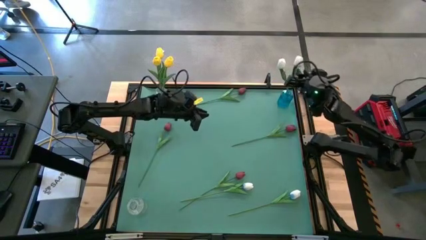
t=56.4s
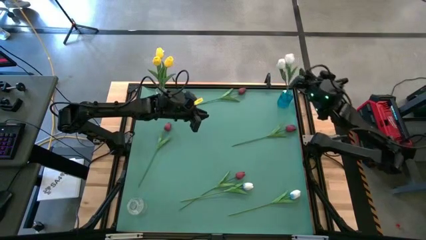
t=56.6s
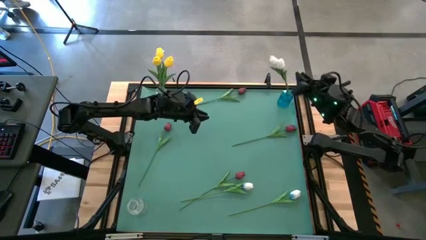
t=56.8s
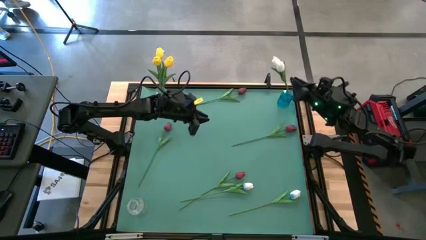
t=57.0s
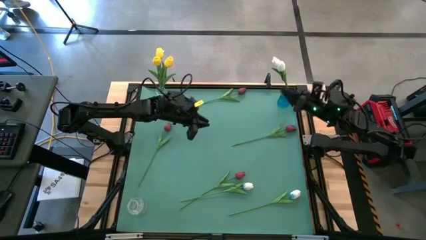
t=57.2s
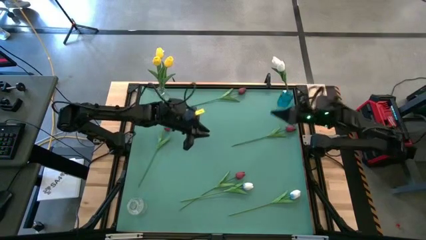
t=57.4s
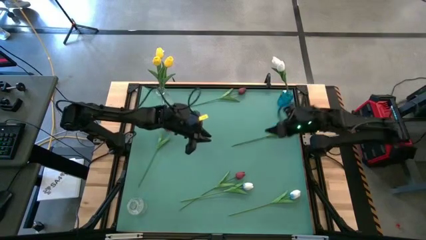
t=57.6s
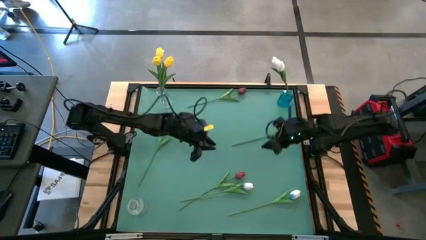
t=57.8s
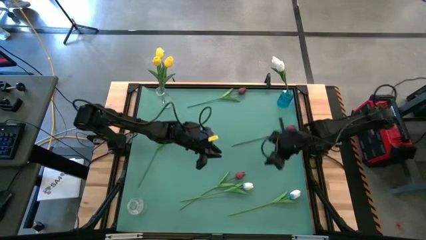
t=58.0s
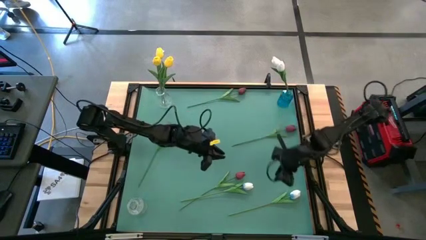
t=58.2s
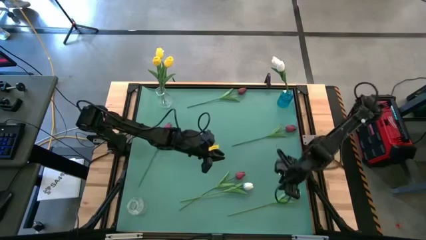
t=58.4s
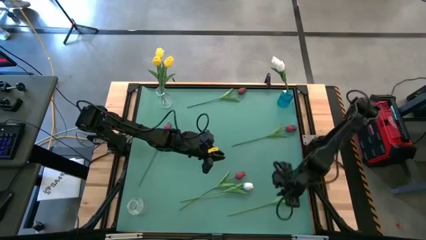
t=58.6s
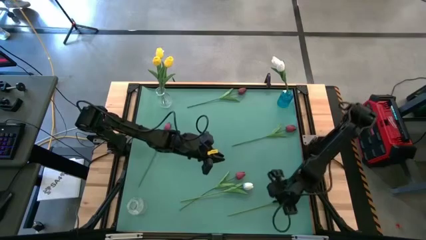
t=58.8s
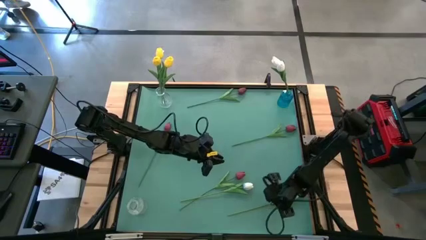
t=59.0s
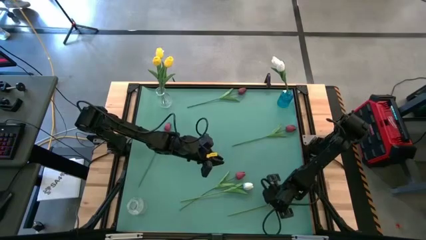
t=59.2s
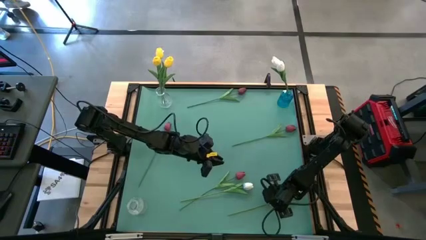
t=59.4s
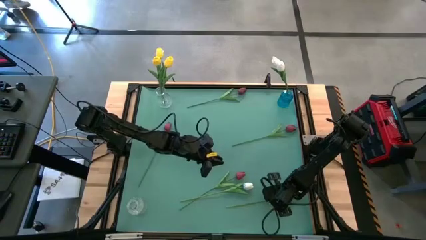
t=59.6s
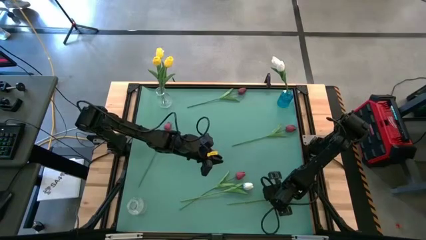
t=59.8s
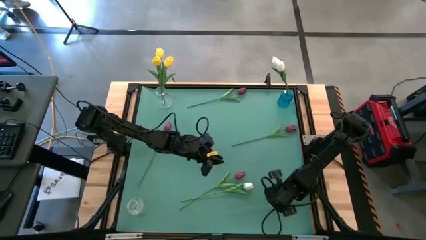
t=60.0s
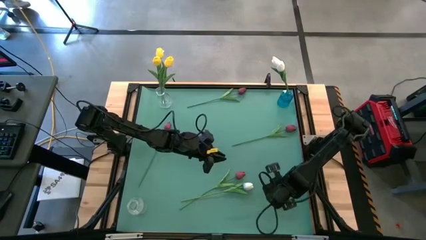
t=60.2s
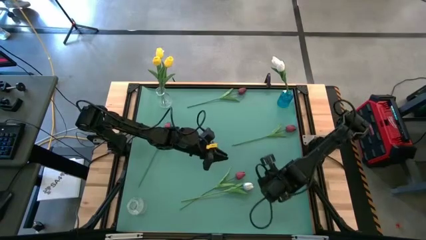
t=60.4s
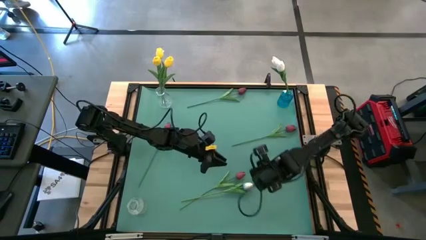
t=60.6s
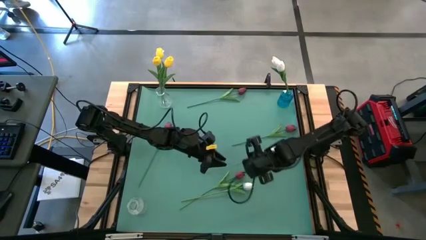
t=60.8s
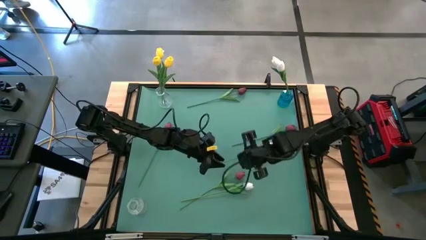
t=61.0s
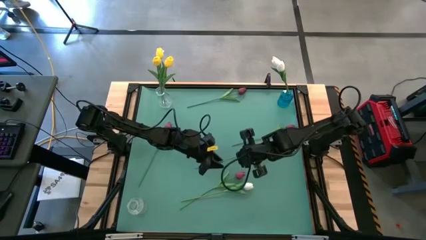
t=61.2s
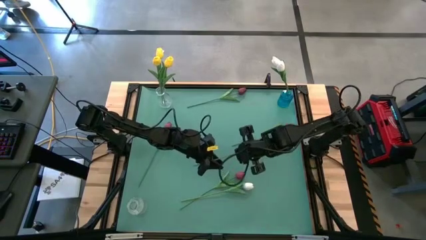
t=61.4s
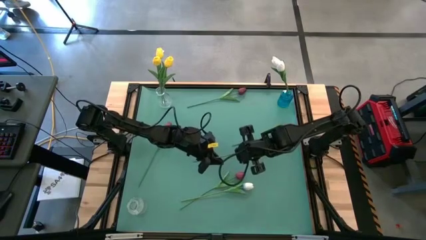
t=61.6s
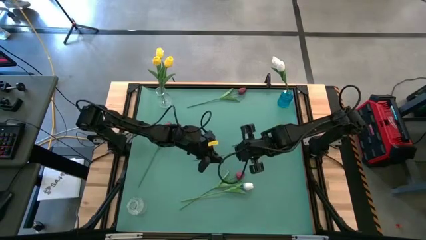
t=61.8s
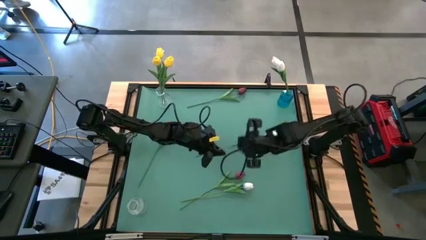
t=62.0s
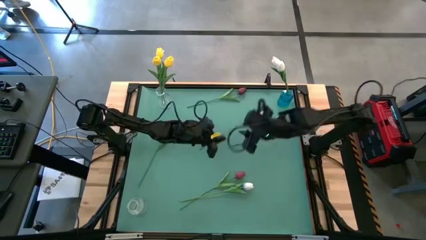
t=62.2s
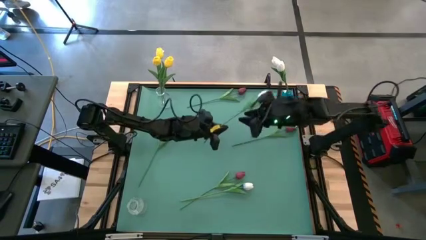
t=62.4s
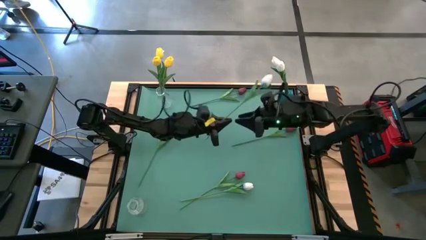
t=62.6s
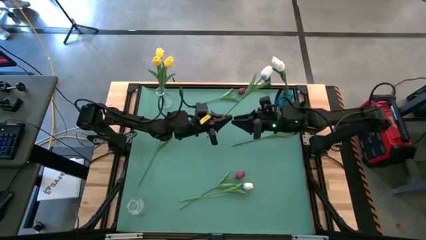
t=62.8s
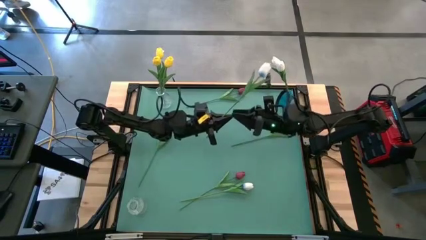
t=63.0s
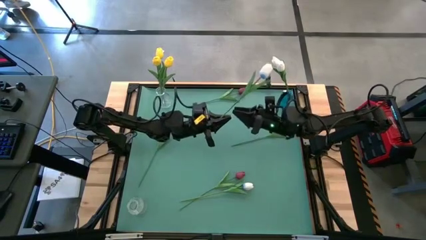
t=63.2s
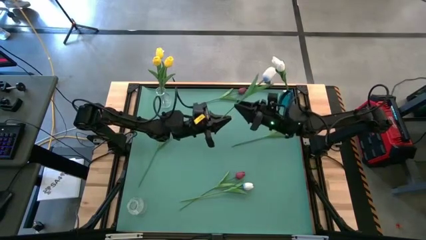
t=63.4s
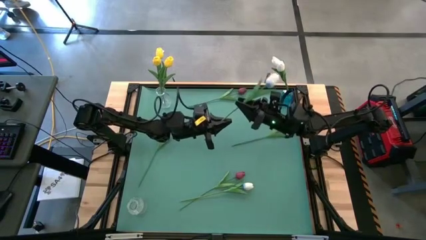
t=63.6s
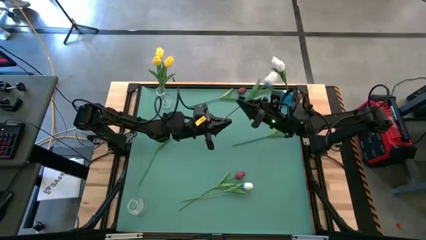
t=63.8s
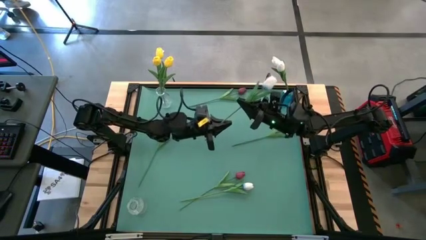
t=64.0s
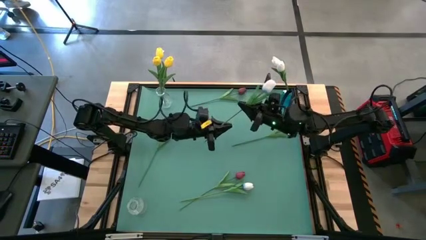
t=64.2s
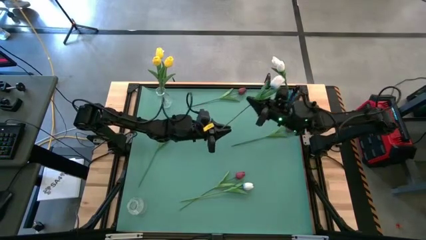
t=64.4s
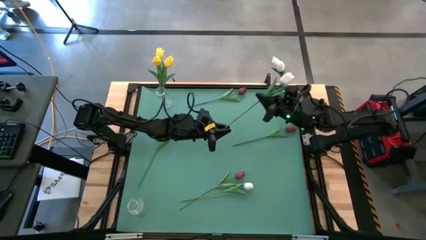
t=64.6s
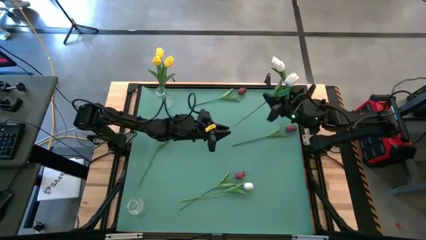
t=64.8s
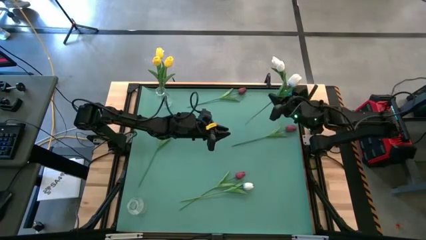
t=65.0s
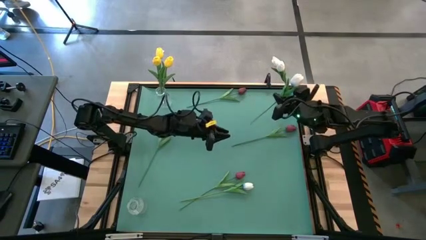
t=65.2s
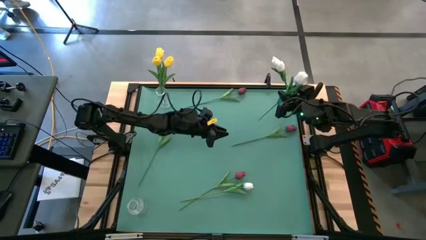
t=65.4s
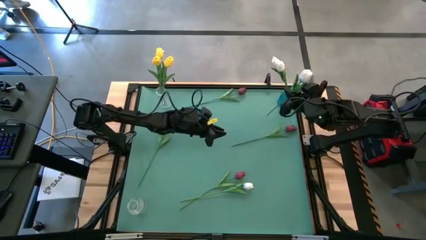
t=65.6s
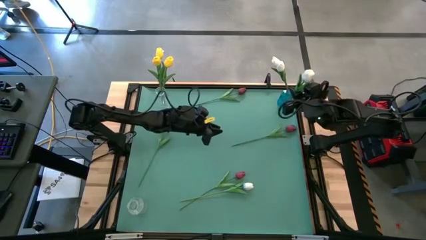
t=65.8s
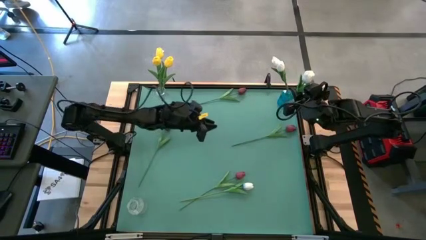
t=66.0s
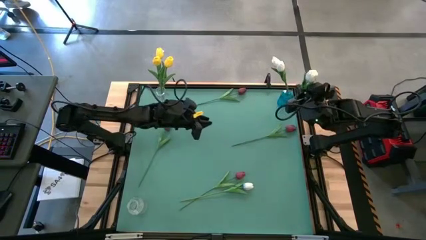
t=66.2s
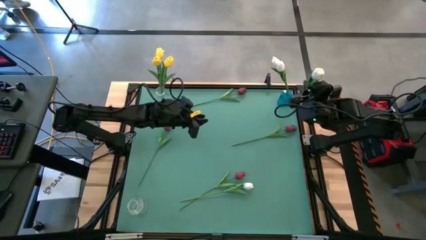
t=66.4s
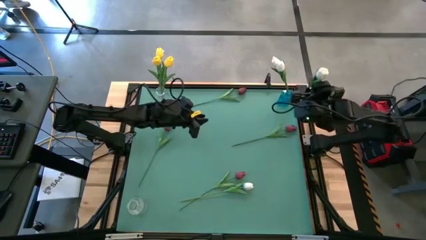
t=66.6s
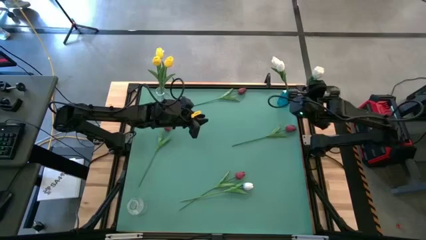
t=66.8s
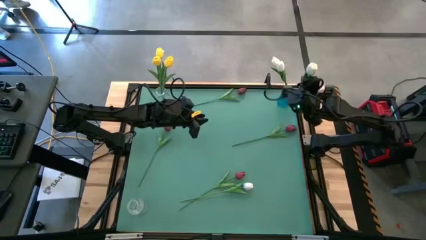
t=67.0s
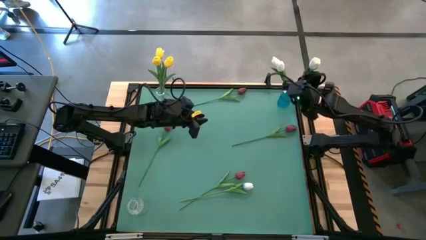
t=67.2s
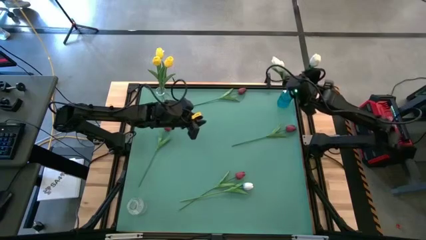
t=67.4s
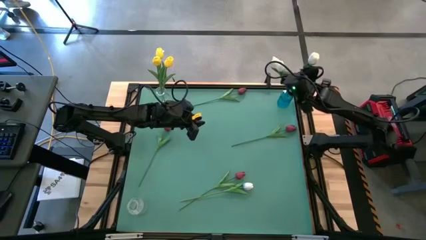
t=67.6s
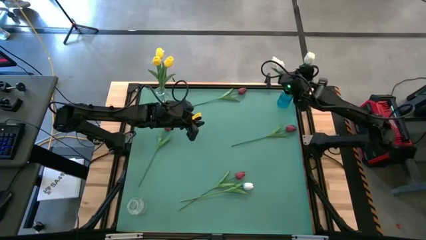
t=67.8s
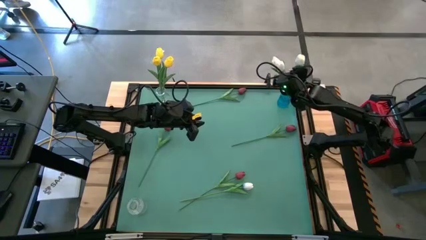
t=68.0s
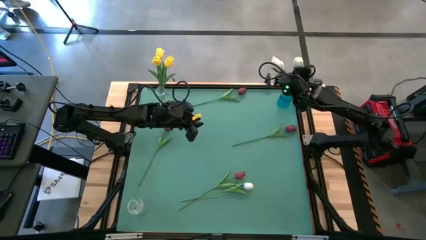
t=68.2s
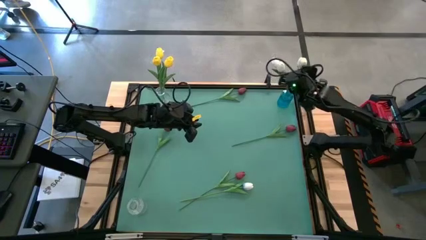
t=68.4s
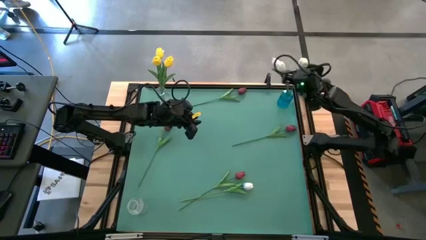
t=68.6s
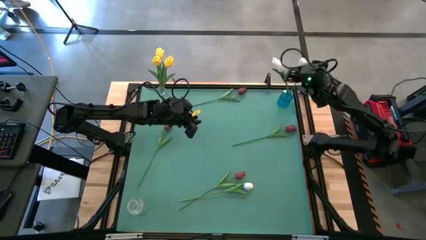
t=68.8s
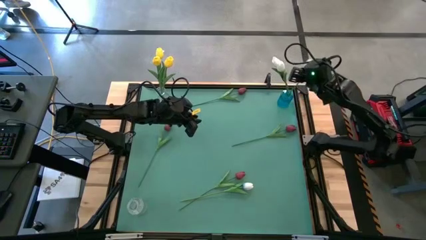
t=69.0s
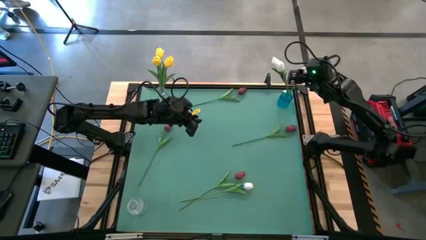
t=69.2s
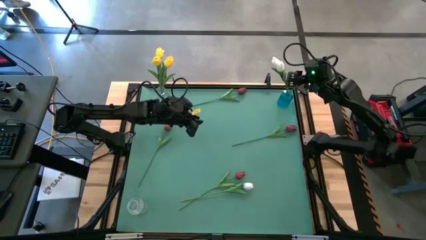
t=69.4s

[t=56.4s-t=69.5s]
Task: Sort flowers into vase by color
Put the right white flower into the blue vase

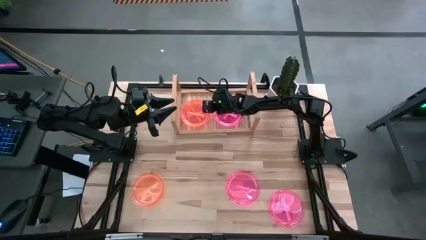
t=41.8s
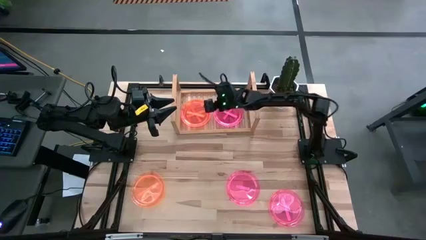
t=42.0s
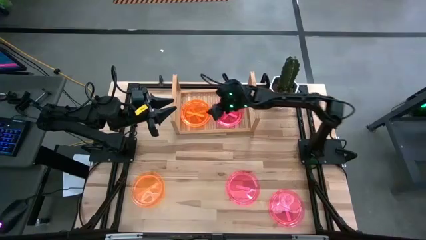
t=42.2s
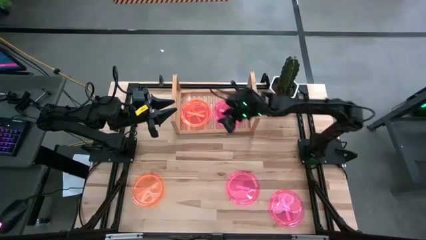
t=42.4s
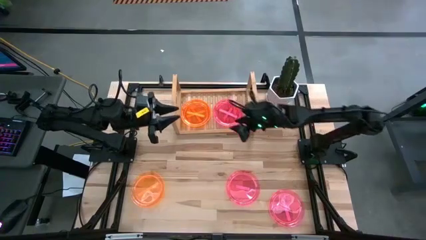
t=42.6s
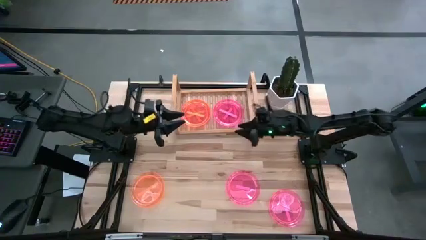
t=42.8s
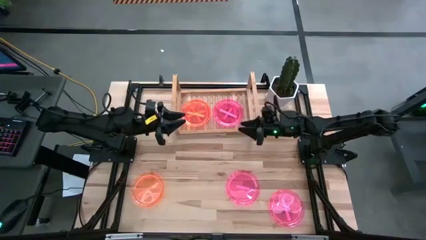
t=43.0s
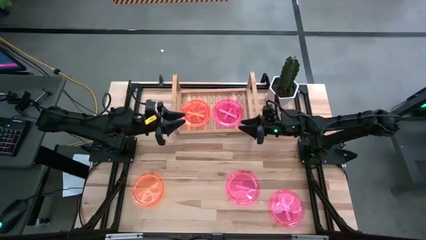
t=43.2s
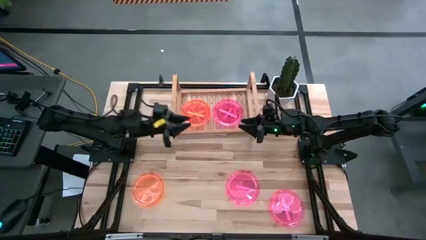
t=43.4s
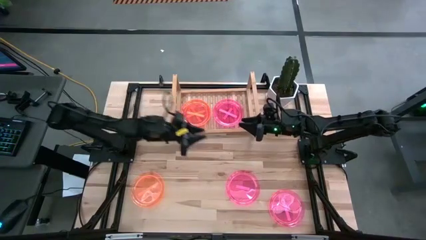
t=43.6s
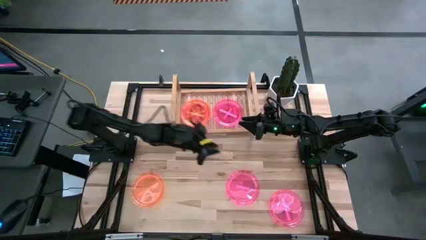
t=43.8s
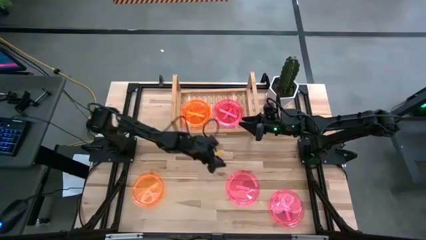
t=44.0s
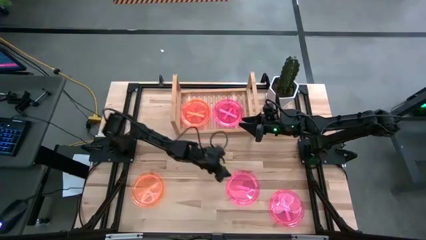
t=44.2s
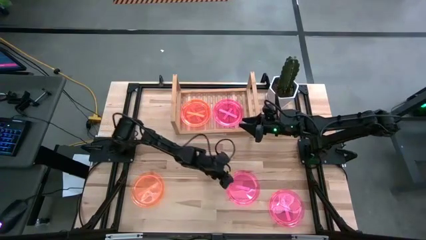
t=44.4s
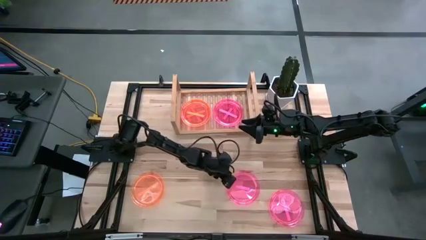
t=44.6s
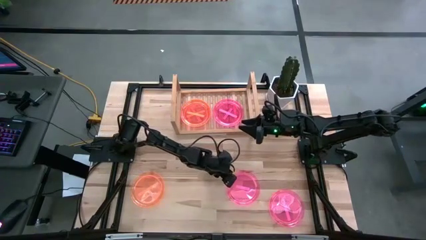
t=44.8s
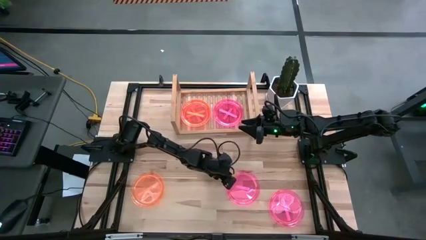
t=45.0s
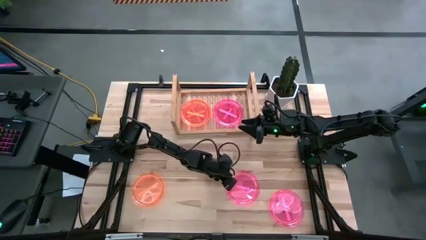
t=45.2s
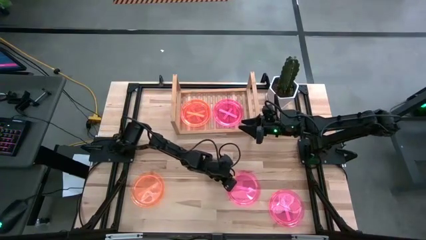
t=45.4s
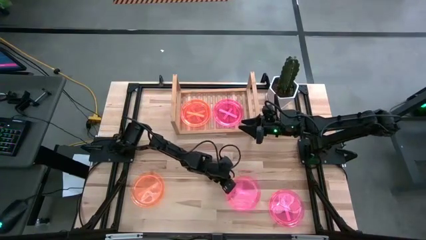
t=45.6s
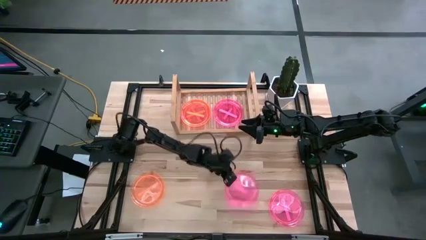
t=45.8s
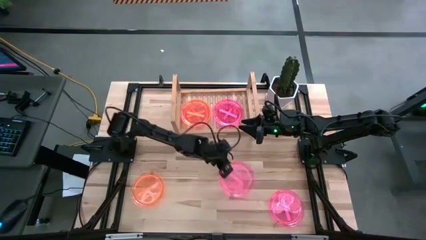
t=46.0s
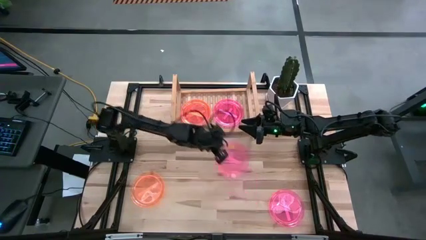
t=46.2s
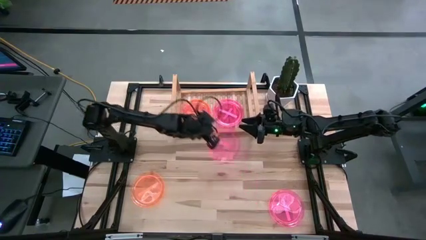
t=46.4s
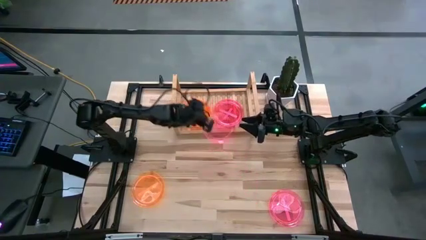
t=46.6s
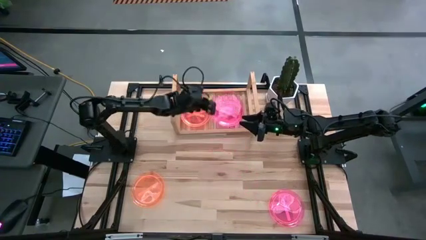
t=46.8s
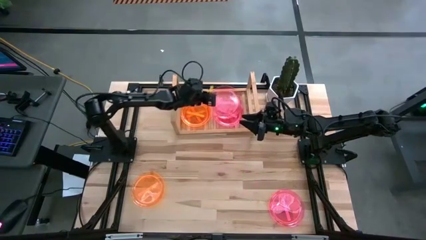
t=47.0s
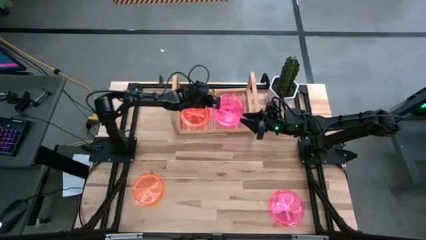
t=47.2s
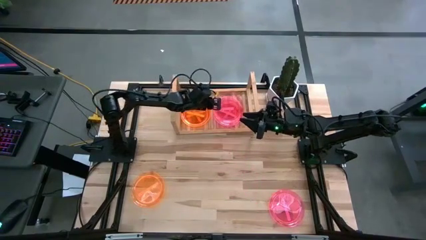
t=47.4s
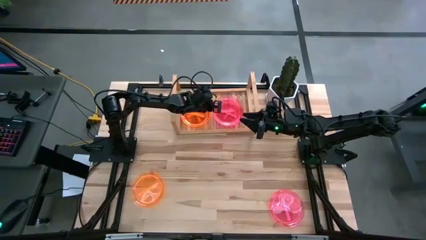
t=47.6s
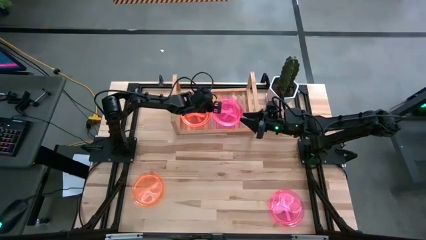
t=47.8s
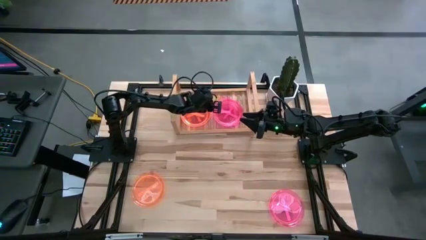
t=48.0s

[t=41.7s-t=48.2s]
Task: Place and stack plates onto a shelf
Stack the pink plate on top of the pink plate
